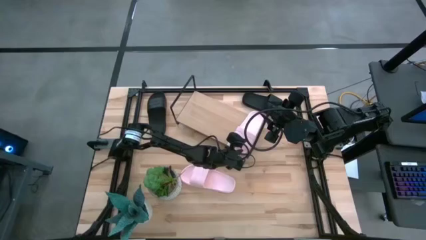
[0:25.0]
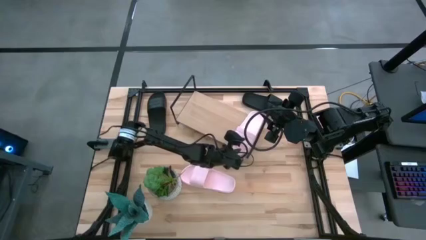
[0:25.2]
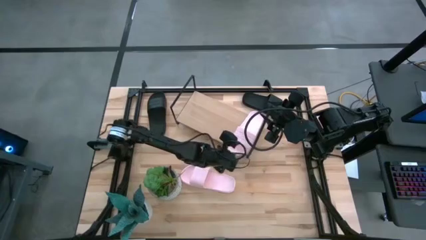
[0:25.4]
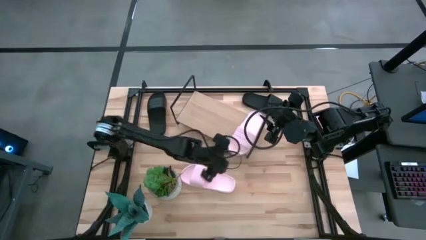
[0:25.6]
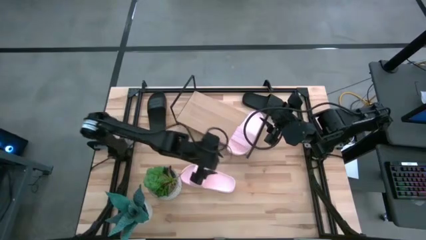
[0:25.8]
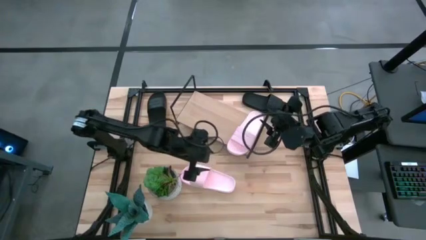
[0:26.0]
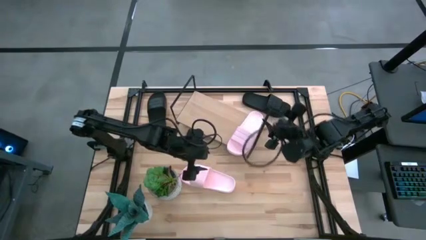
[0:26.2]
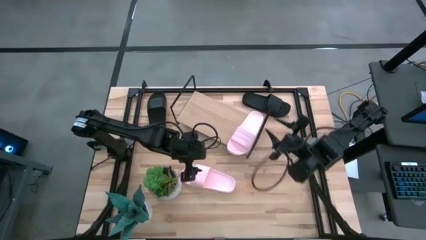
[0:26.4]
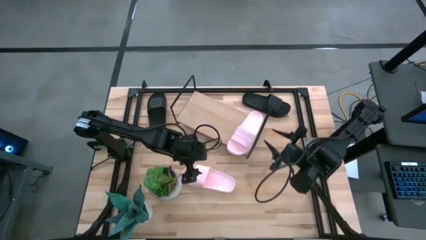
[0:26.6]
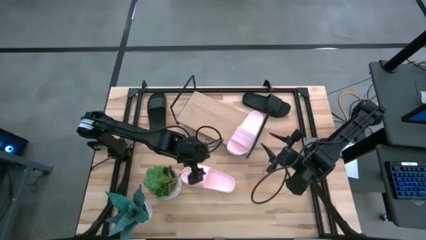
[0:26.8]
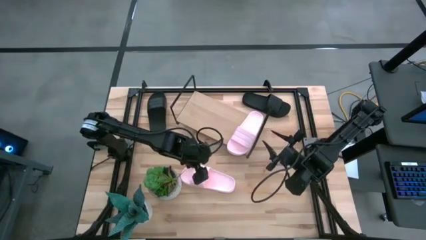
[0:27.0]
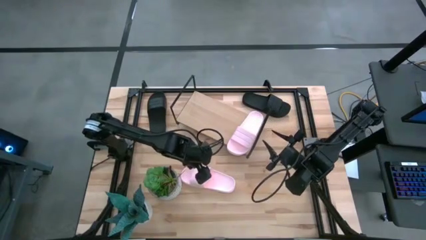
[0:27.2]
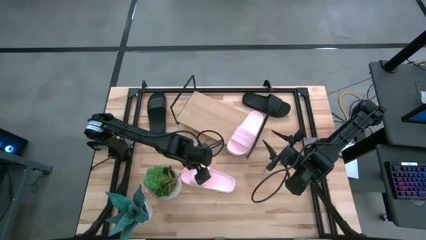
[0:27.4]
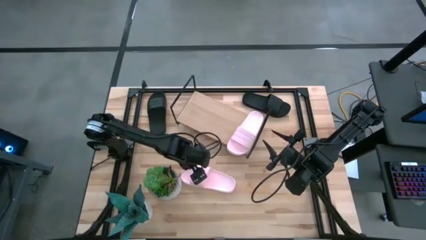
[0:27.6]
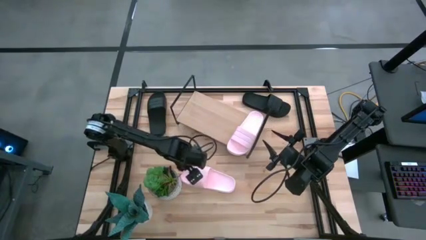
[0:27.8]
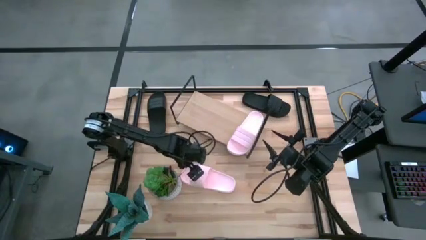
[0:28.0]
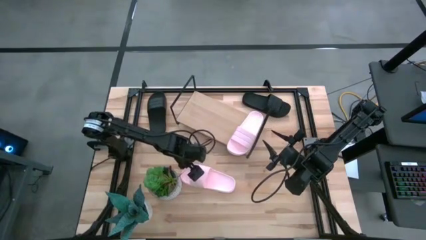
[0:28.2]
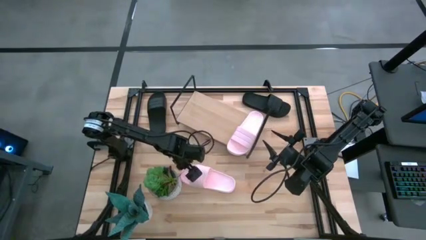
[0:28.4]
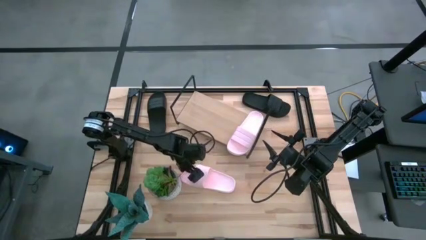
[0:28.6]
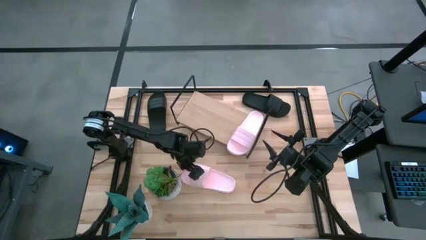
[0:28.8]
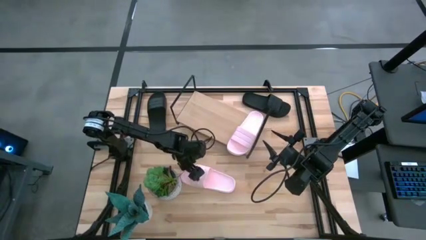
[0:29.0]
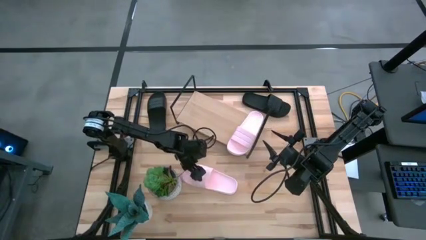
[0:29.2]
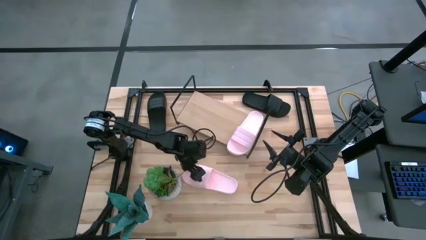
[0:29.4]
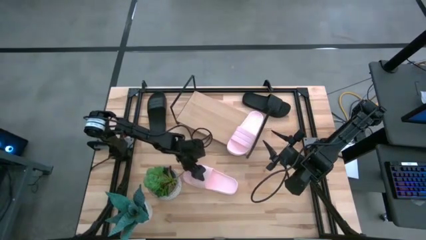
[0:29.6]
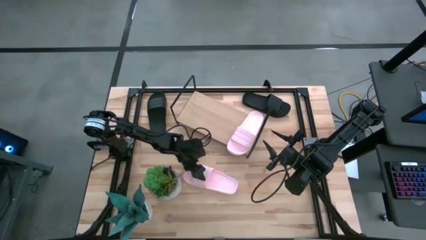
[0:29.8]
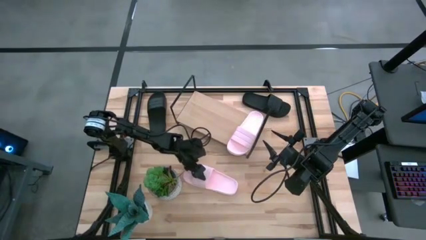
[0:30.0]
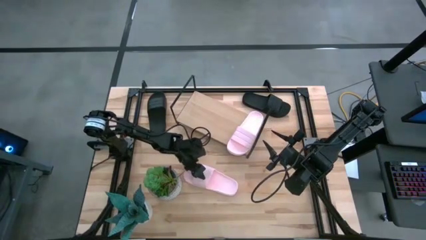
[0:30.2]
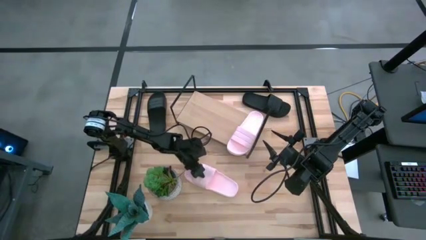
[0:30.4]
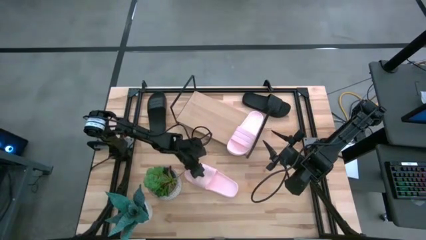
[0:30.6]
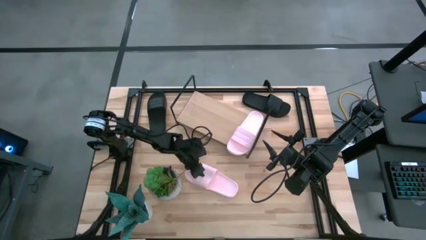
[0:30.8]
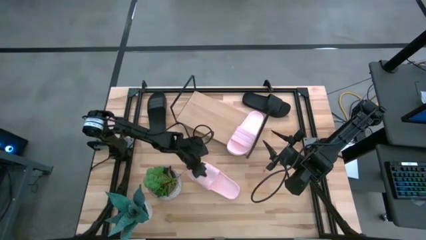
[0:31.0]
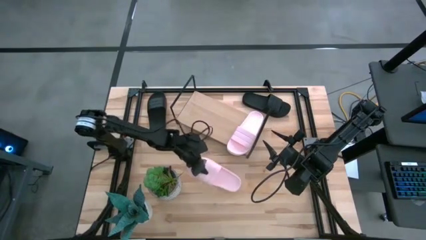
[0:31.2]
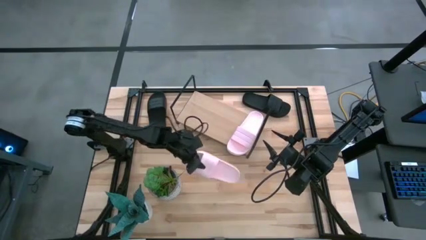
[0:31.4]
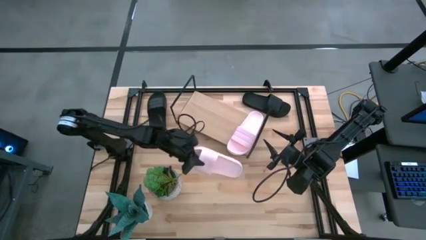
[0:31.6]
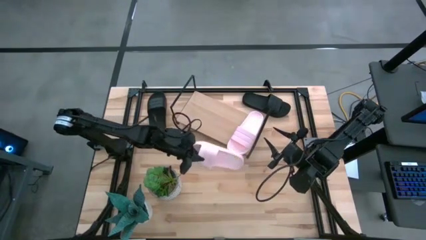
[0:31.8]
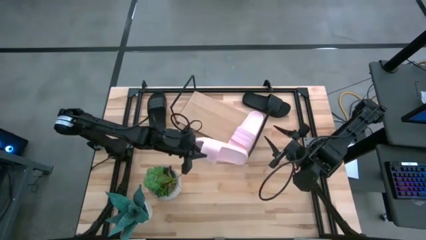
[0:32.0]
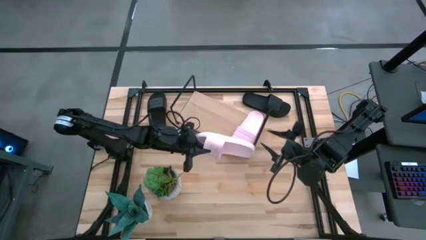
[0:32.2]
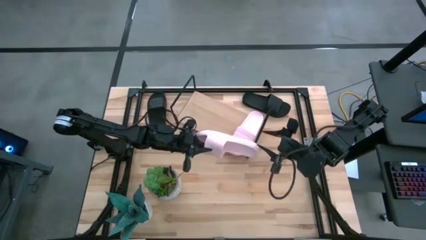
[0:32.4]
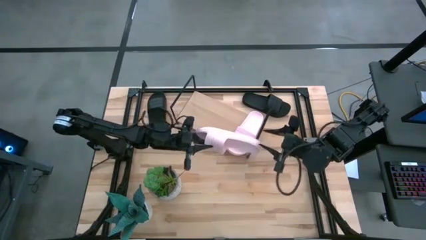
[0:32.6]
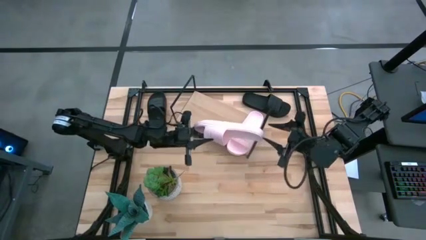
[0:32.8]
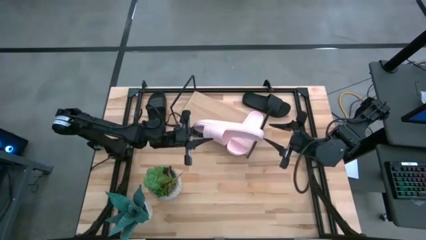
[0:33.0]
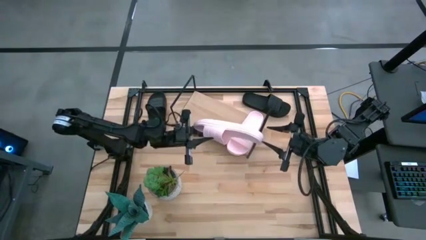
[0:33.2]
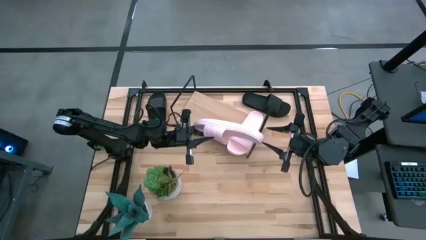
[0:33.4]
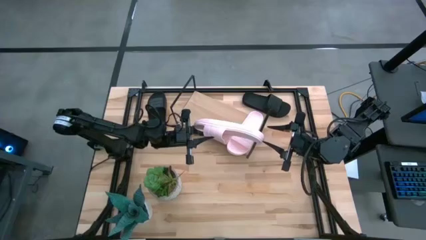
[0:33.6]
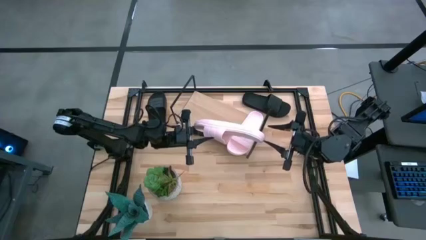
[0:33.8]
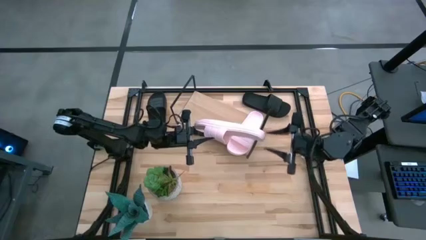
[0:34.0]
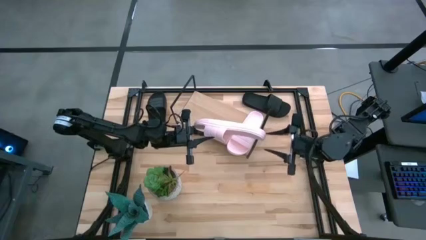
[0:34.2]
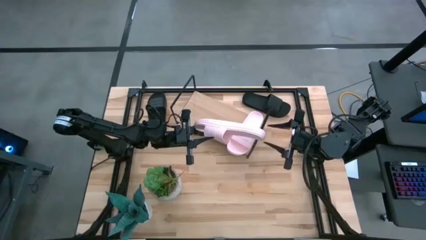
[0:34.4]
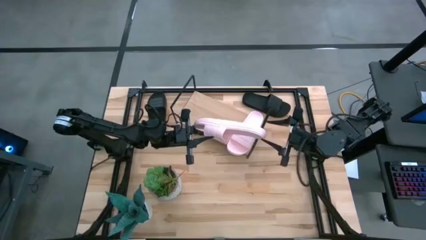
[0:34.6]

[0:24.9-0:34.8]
Task: Pick and place slides into the shelf
Put the pink slide on the shelf

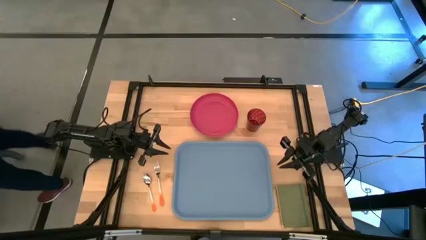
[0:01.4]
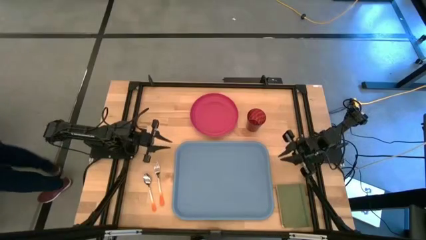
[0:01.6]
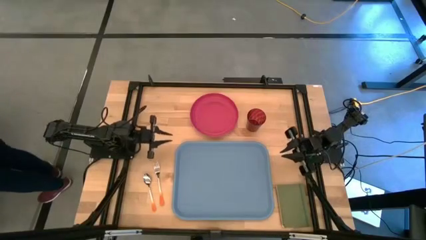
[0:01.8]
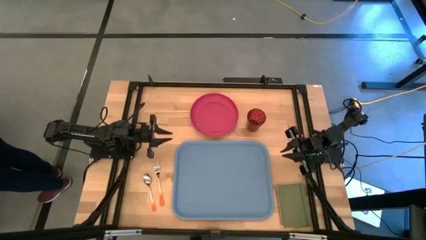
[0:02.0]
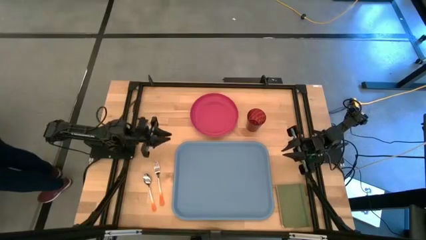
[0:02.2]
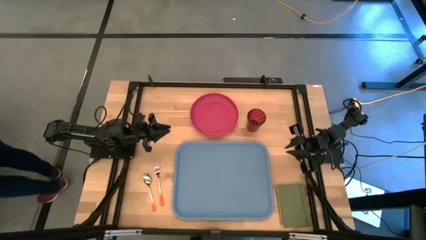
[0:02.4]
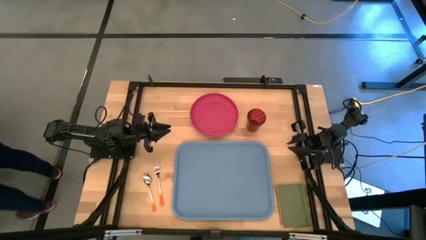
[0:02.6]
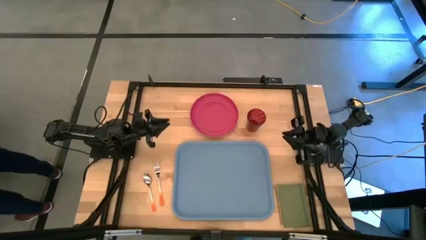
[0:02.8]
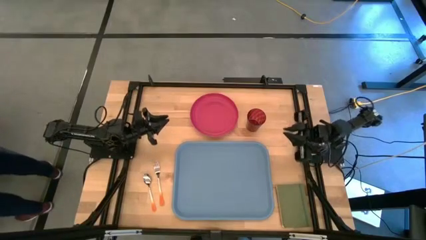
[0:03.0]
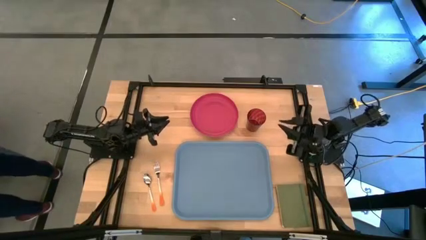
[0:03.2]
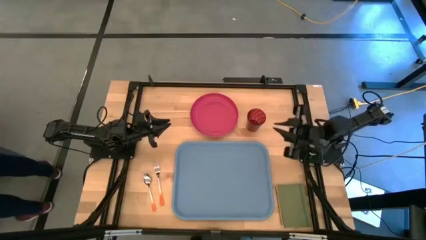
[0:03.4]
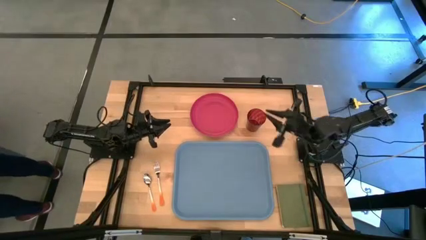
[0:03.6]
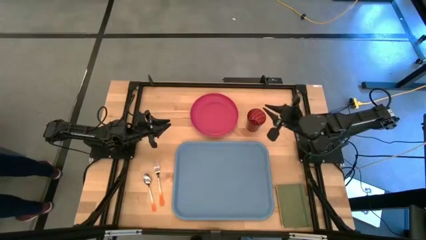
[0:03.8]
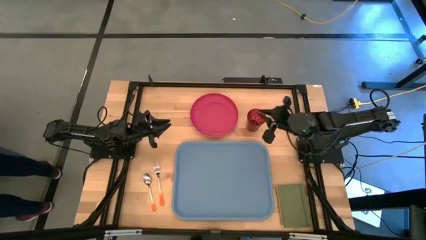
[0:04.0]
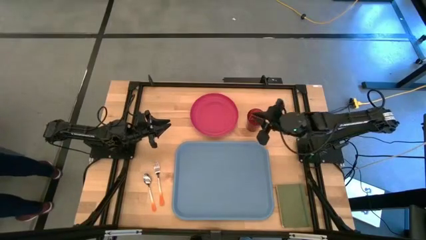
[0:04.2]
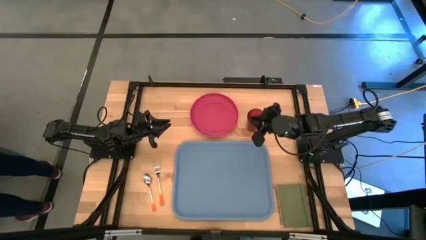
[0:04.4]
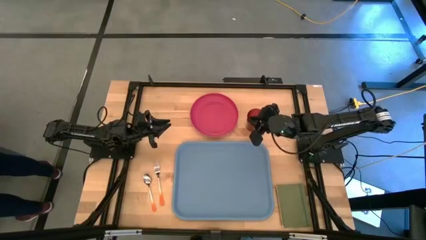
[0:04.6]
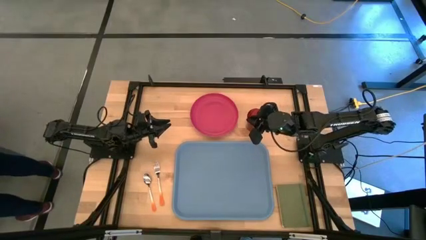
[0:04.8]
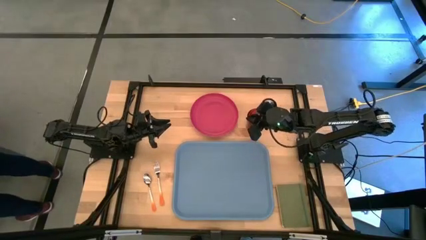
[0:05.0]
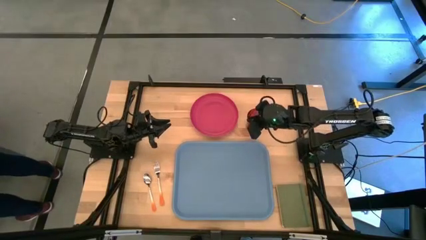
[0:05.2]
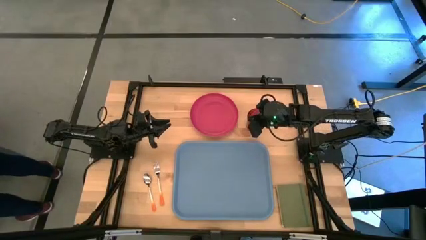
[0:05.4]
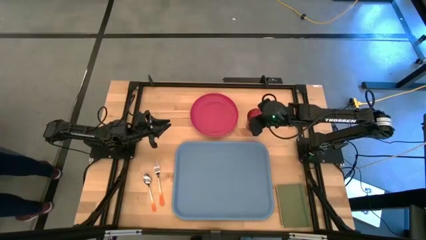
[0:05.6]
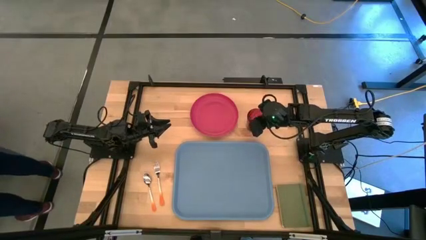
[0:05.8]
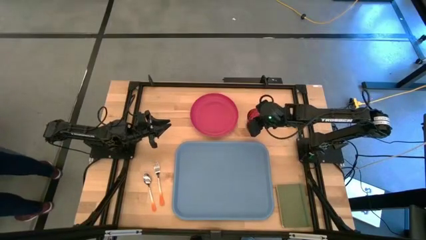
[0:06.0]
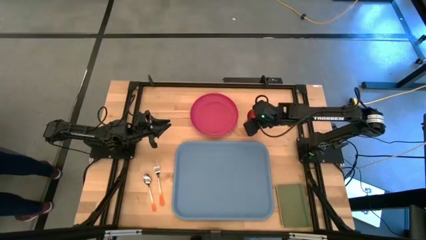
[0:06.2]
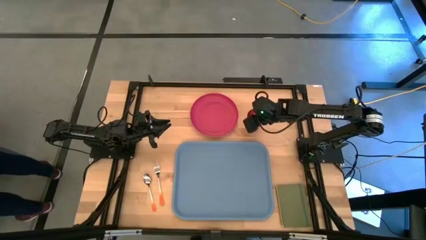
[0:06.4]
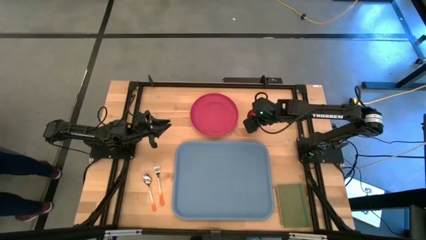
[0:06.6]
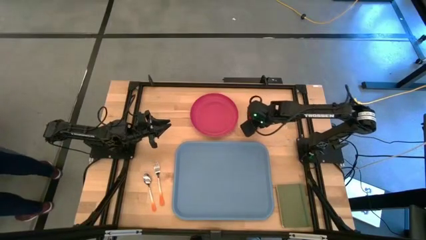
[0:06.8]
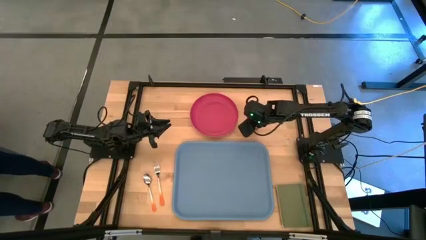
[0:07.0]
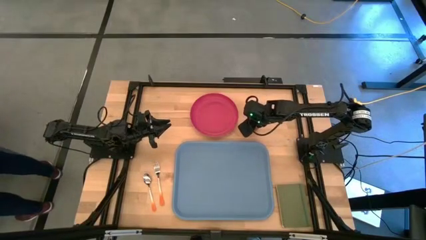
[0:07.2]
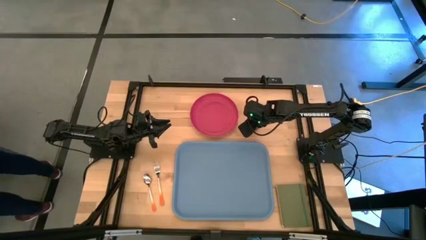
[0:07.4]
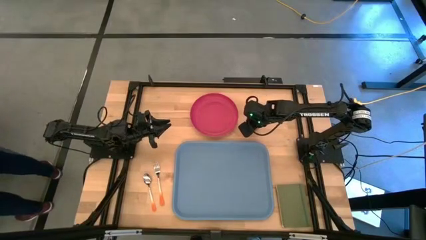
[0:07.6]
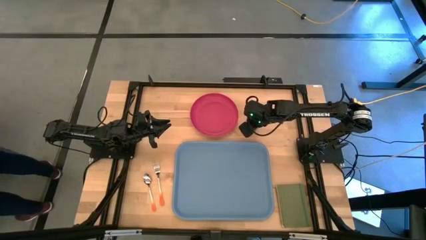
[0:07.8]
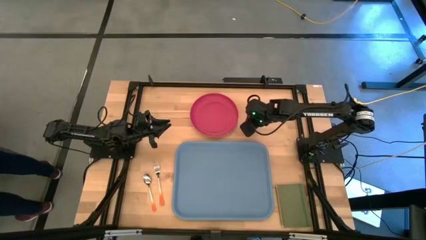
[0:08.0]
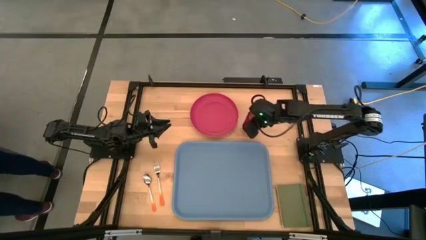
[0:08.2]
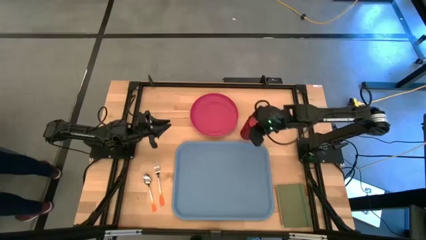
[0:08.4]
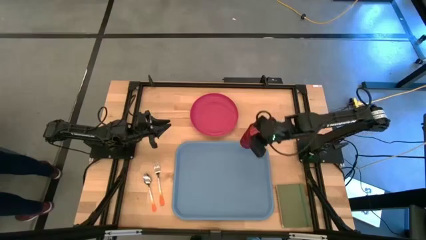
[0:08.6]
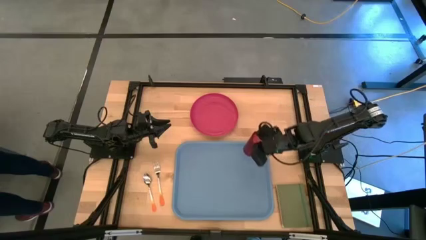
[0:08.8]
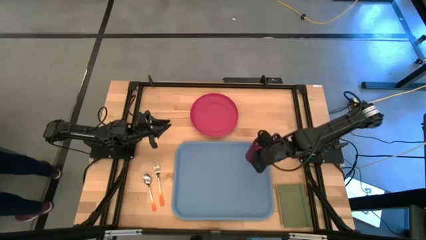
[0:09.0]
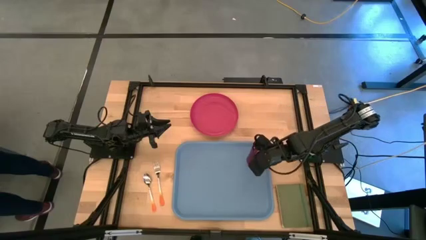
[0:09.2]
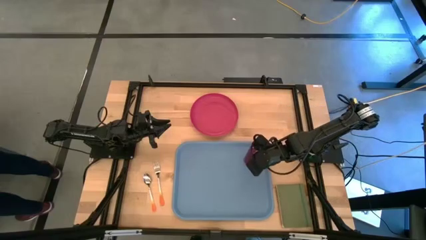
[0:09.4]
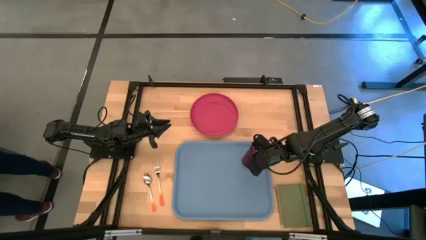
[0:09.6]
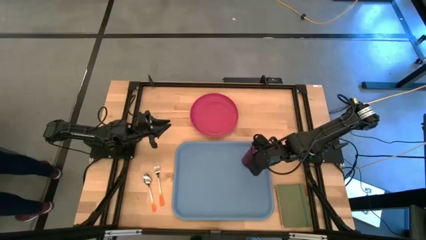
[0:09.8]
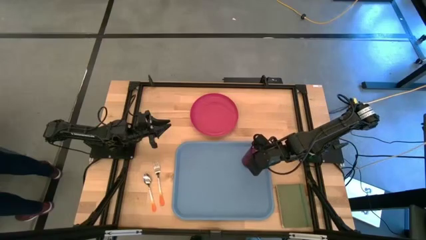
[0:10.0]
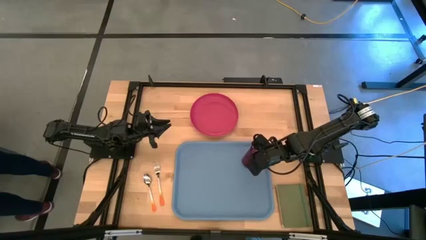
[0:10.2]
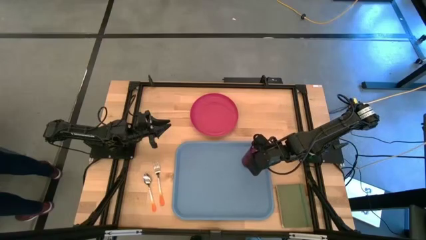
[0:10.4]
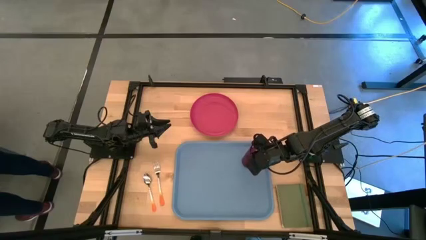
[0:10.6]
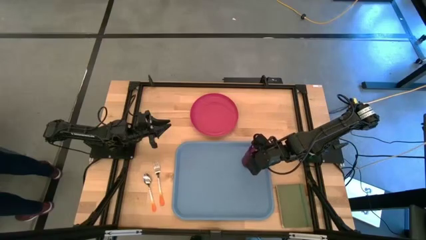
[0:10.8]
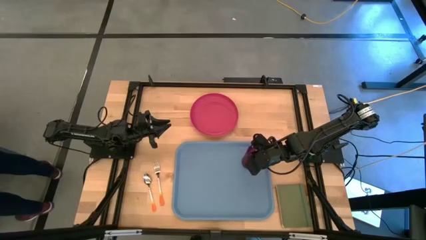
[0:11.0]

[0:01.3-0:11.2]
Task: Pick and place plate/cup/fork/spoon on tray
Put the pink cup on the blue tray
